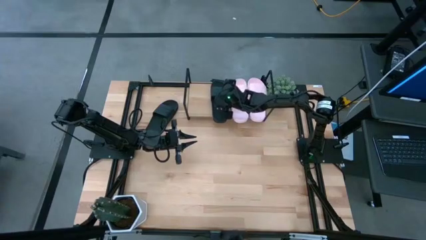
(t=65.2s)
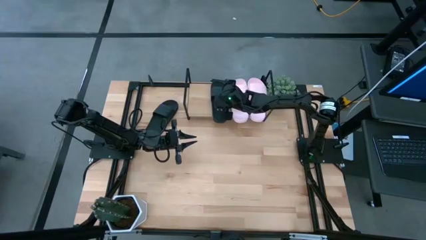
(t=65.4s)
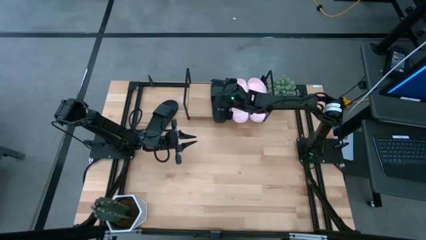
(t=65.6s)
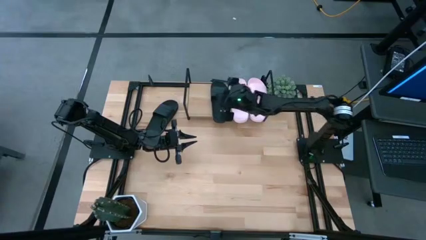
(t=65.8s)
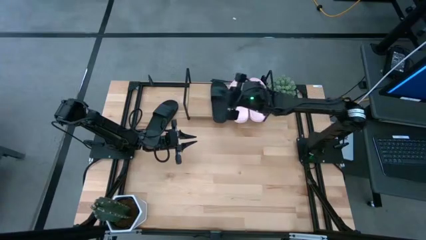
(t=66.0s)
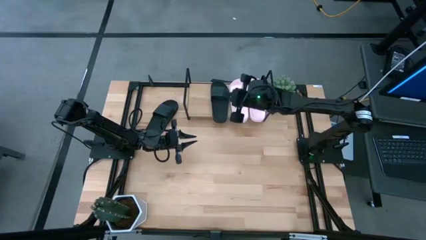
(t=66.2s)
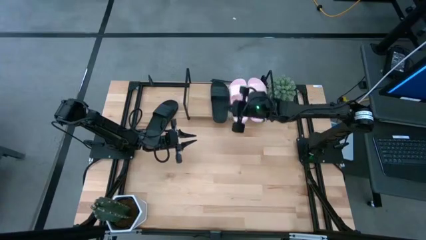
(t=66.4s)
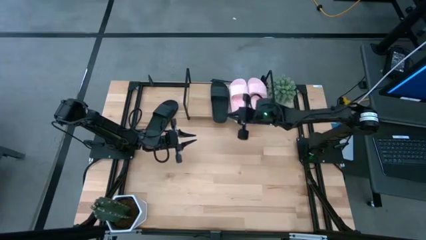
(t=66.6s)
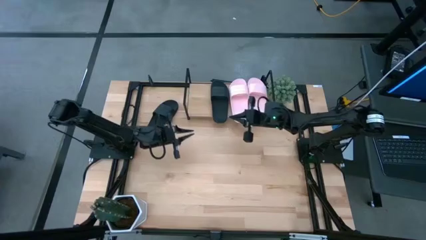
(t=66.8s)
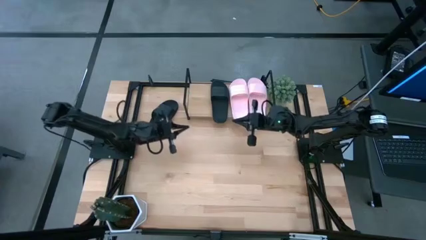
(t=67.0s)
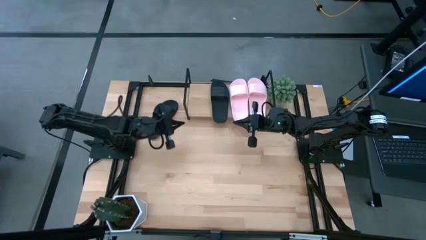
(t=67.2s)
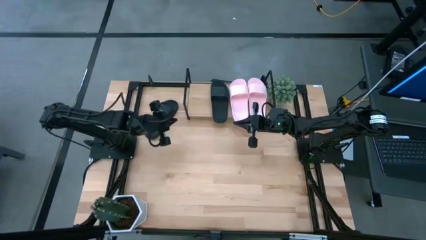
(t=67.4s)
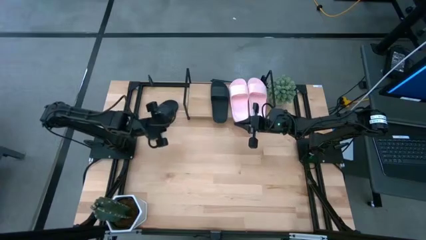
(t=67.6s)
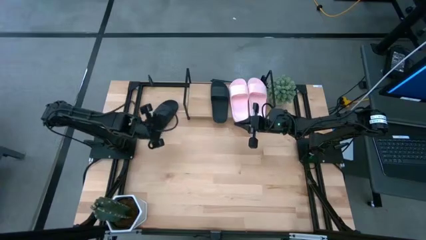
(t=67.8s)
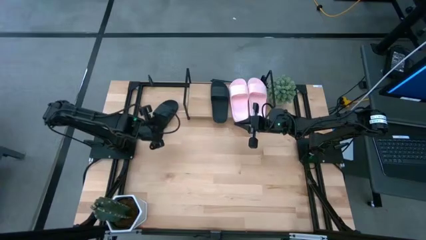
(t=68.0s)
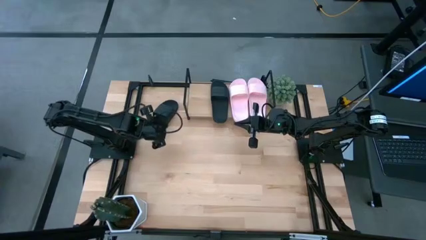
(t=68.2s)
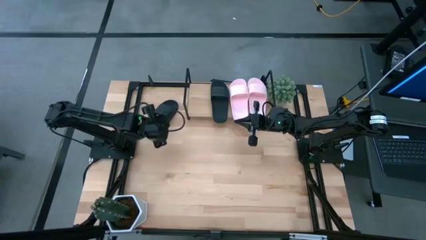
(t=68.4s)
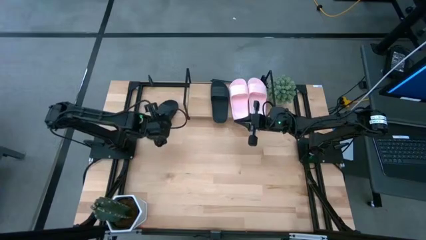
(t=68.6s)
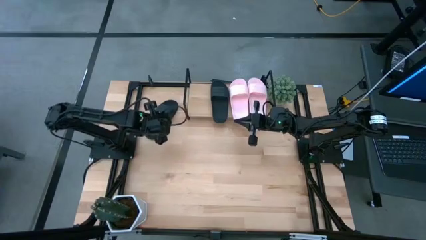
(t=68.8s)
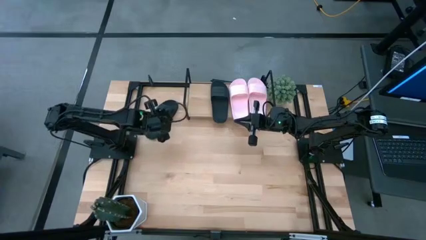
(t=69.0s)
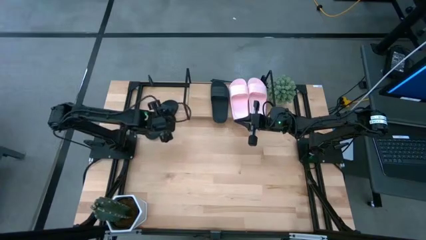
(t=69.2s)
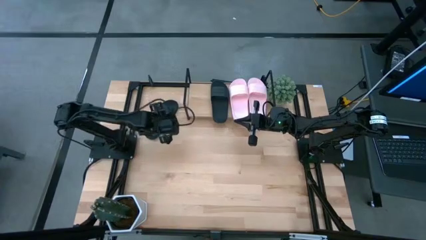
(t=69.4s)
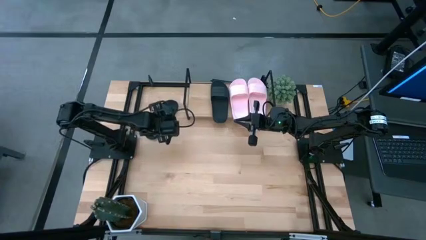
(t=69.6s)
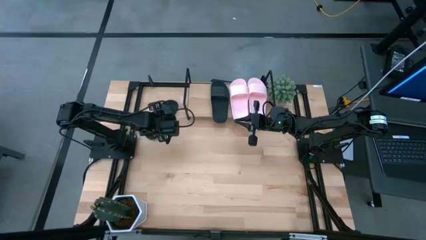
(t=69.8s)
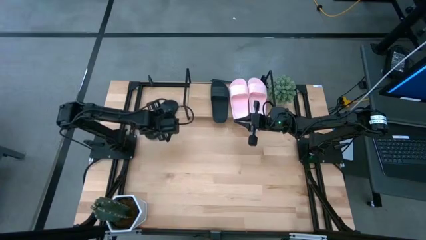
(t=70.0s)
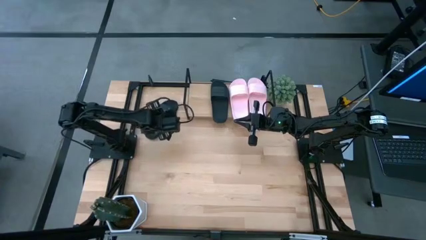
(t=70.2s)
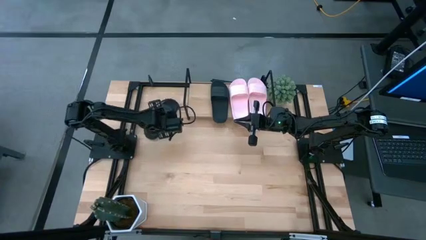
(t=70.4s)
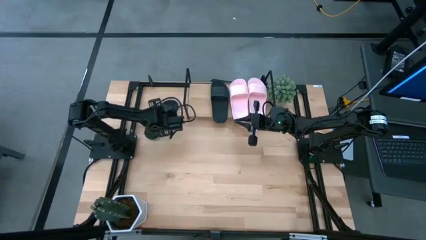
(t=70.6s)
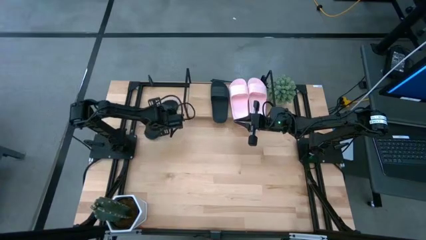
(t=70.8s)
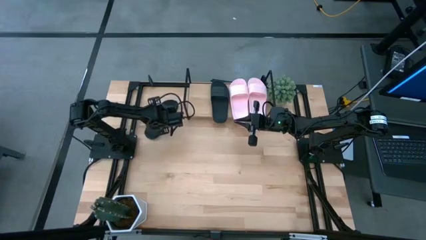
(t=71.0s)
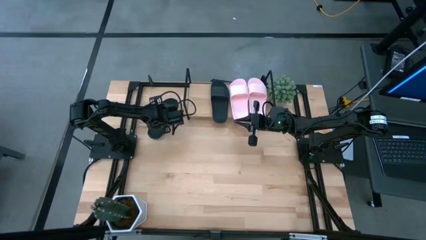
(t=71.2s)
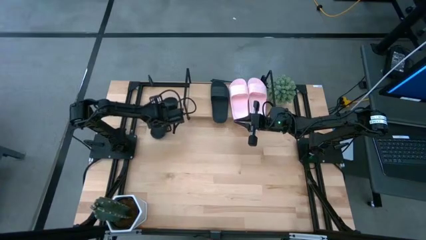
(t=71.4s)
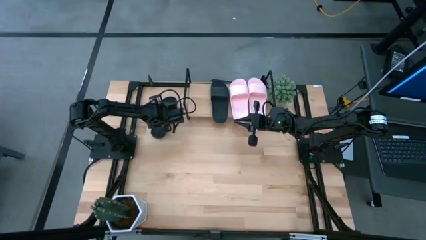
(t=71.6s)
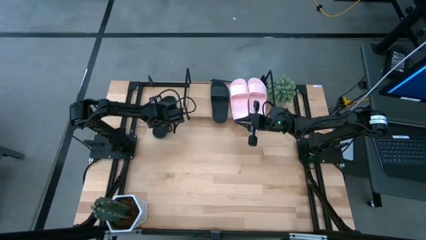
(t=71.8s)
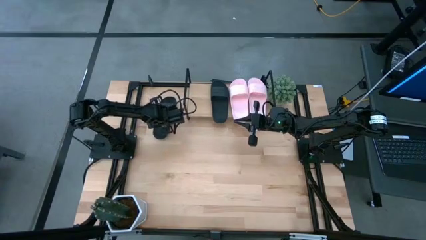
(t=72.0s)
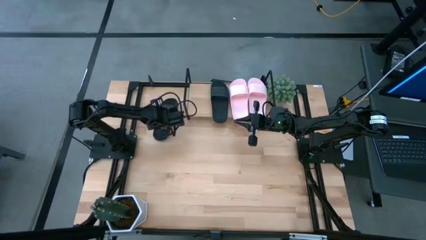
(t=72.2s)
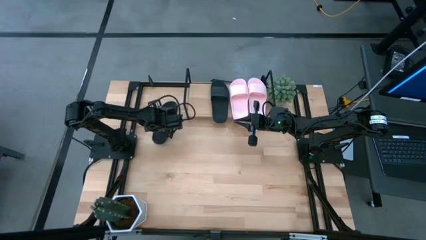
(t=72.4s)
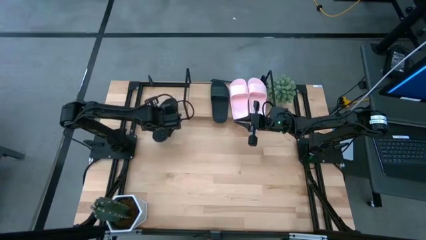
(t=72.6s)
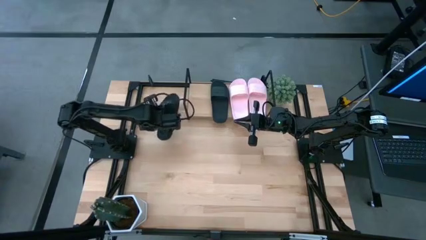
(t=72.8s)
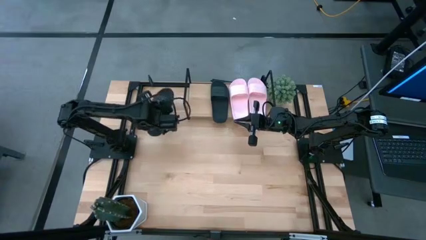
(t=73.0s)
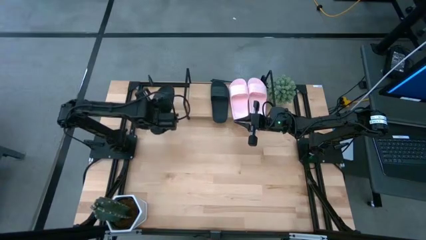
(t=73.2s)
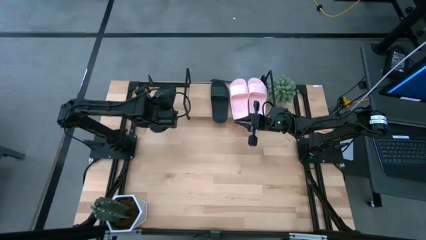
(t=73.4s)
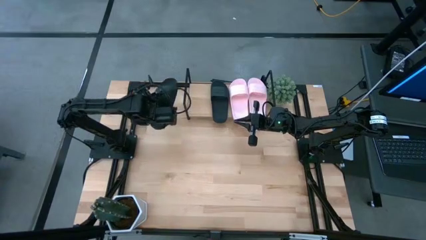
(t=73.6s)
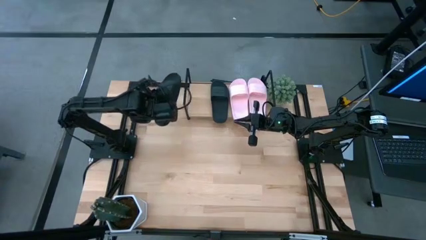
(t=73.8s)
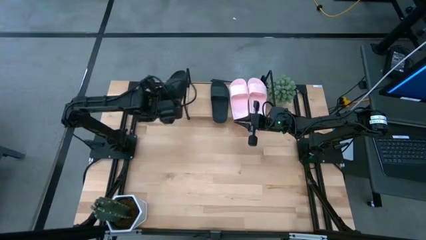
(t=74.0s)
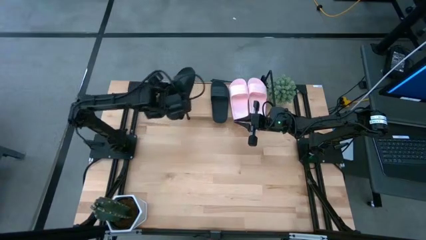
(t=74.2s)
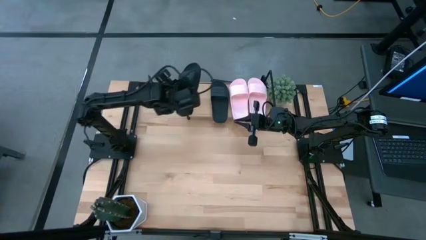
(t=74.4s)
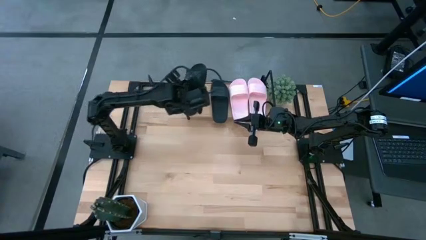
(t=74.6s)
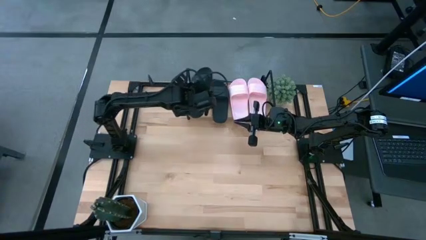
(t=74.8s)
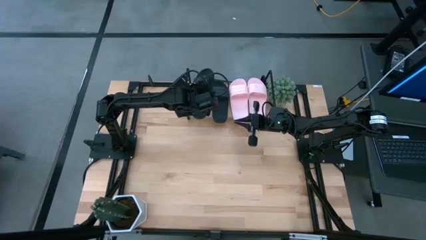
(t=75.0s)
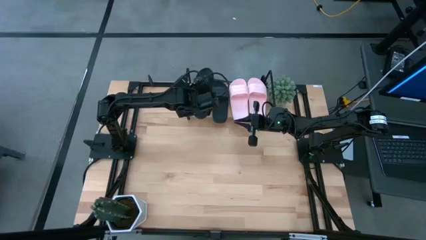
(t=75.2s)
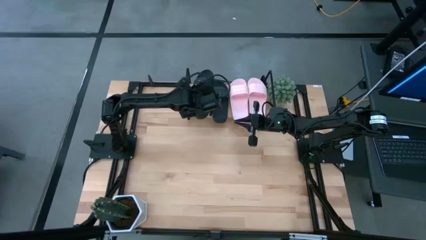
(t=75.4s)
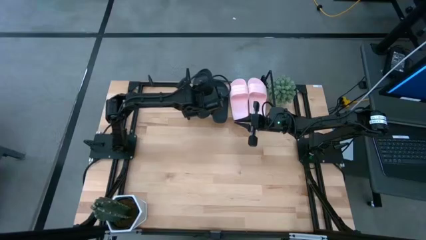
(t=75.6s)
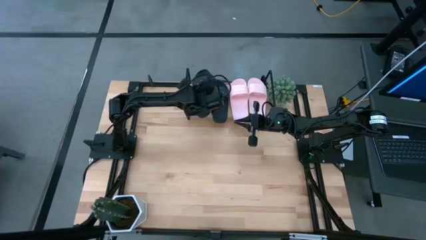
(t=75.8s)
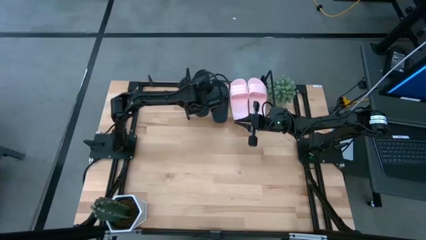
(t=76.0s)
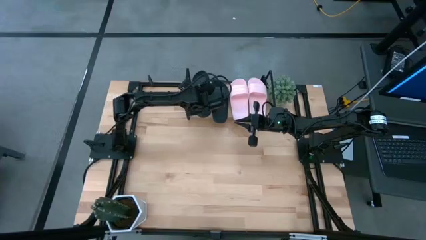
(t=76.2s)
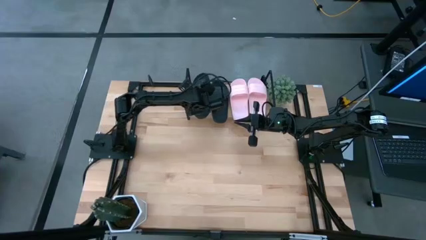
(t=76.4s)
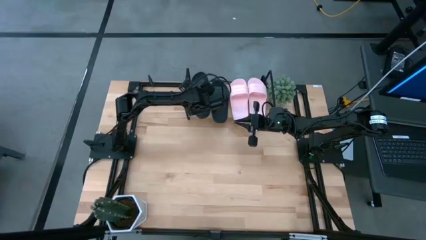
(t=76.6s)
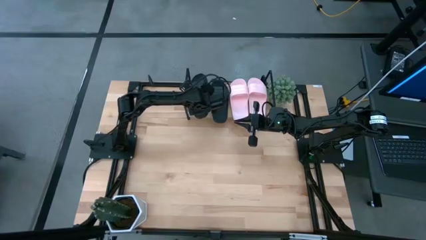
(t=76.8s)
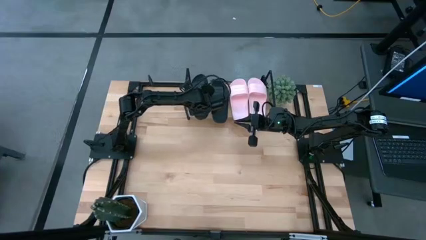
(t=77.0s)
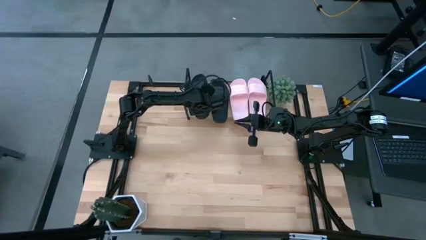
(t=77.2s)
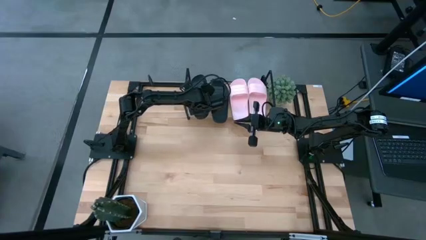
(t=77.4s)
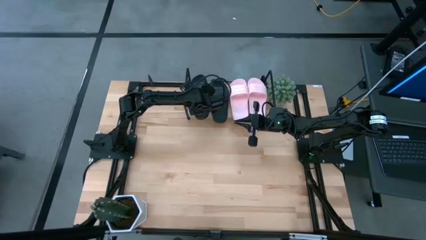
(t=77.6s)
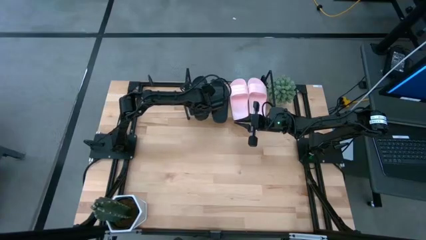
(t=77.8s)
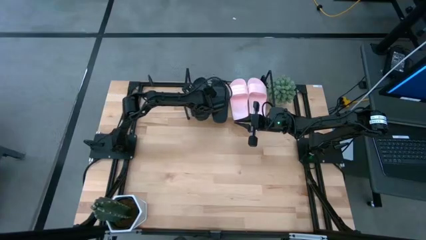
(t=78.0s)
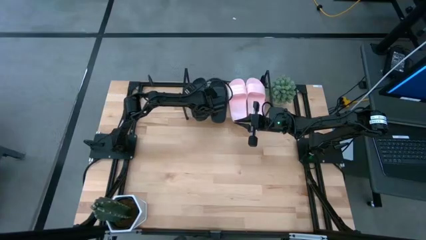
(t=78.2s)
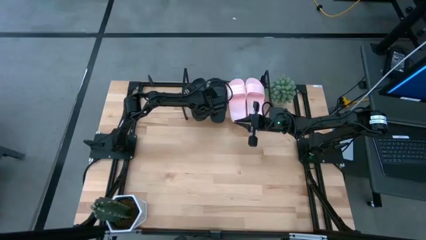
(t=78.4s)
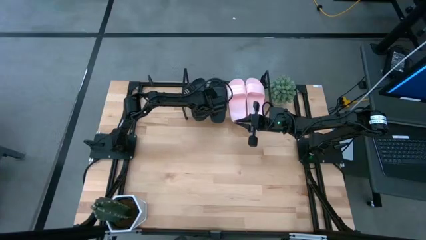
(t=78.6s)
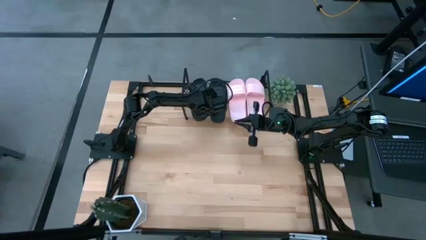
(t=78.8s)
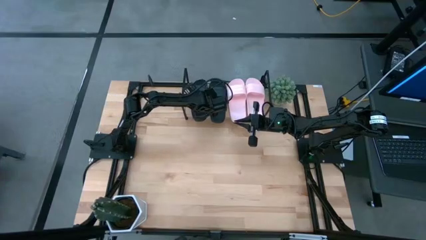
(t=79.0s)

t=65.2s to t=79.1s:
Task: Pick and place slides into the shelf
Put the black slipper on the shelf

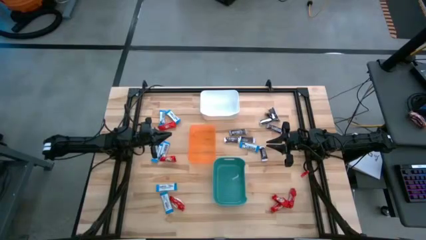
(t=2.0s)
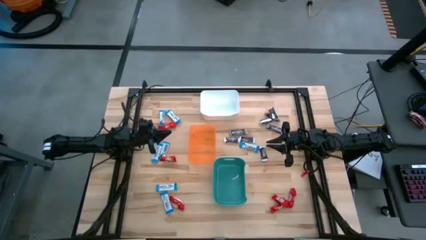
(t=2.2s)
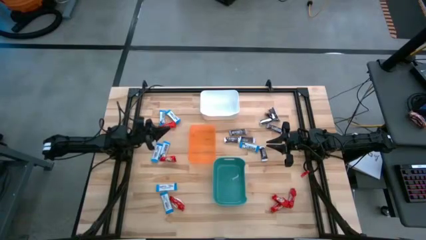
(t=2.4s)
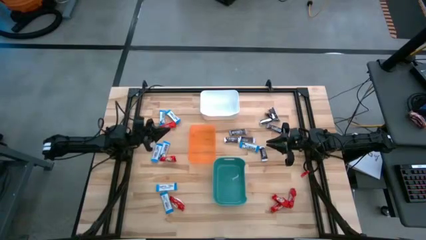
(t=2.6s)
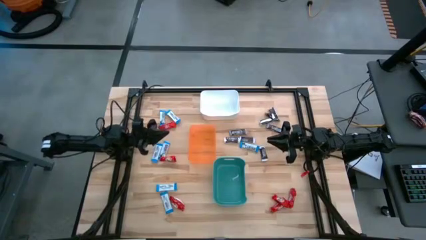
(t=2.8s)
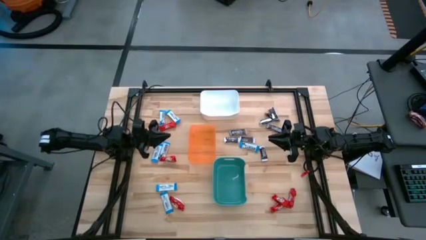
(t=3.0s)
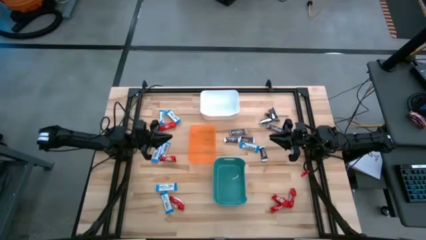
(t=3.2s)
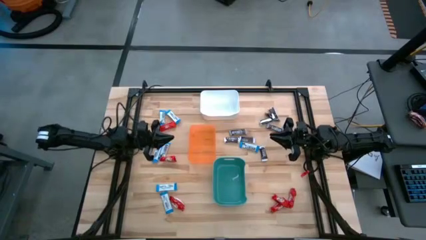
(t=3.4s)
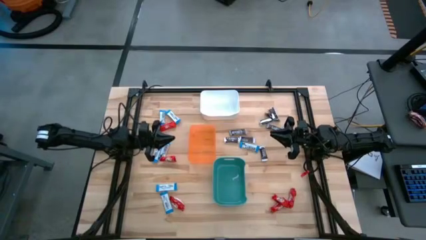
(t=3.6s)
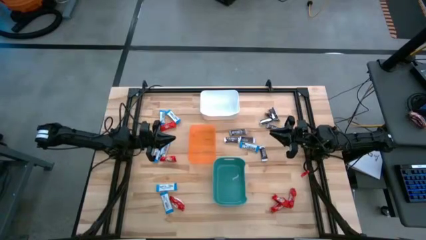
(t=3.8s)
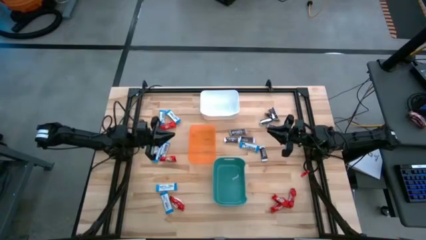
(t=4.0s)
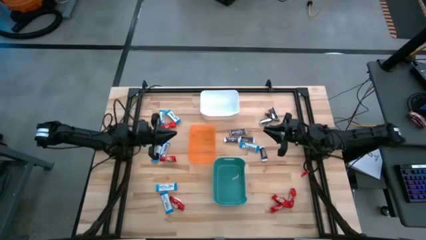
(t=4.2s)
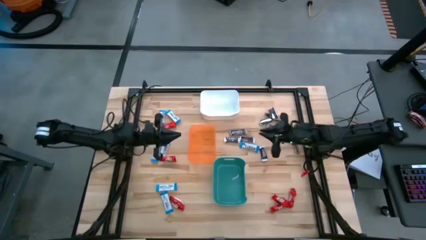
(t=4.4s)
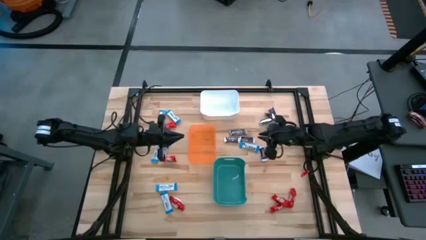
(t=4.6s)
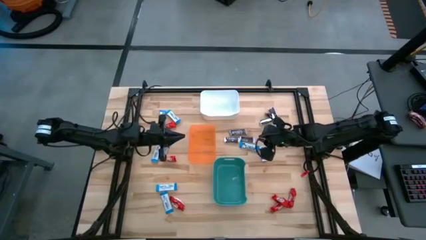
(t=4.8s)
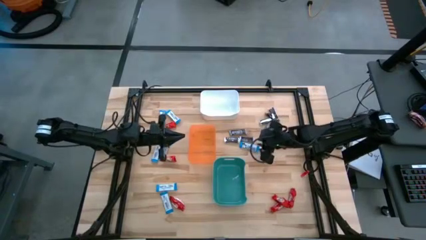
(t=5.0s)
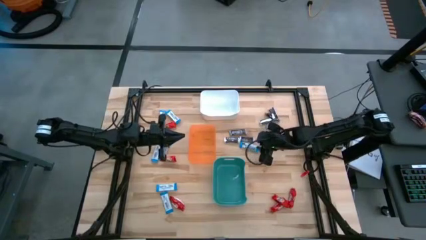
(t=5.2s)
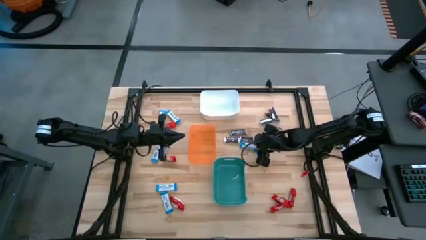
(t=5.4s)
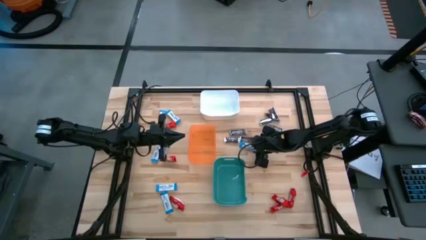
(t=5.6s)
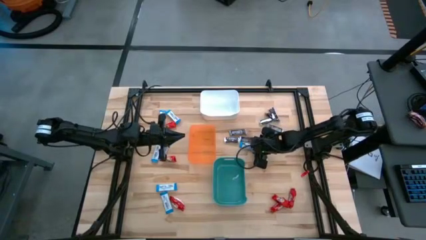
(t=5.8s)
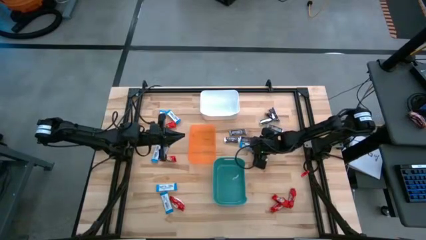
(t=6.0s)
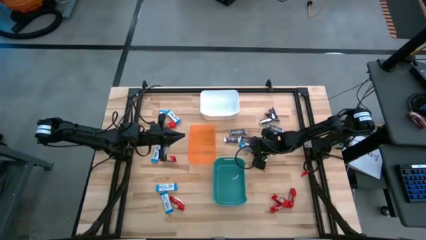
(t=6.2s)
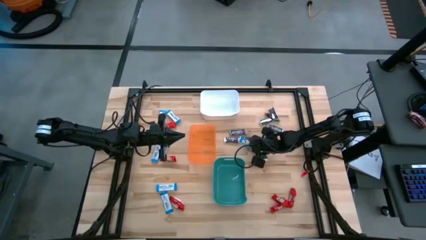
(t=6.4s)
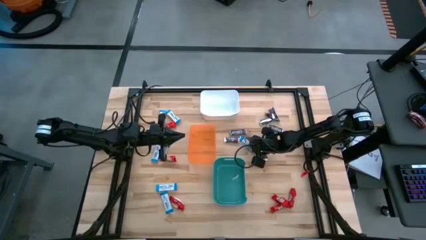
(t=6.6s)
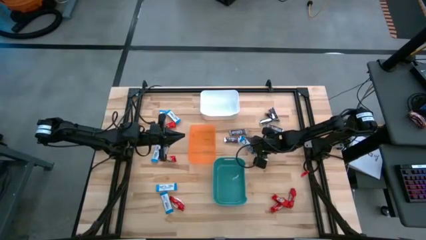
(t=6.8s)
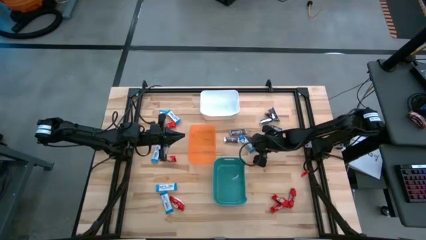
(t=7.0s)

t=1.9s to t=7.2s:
Task: Sort candy
Put the white chocolate bar into the green bin
